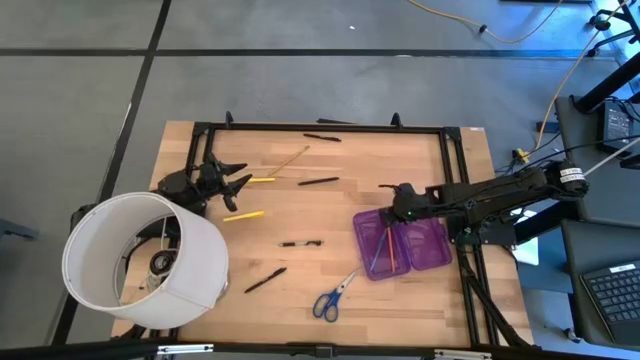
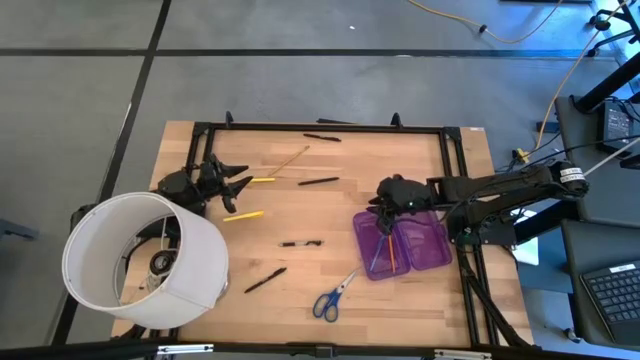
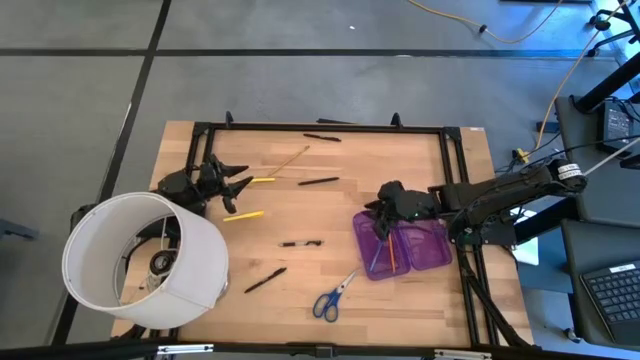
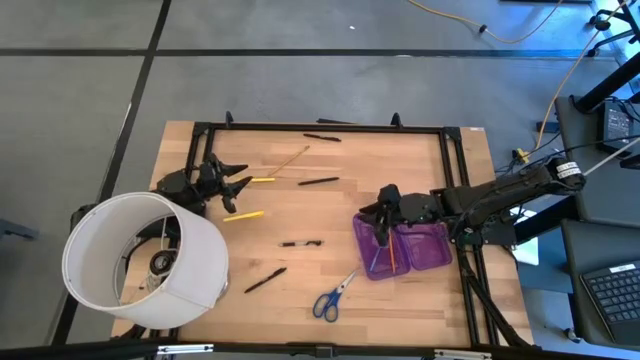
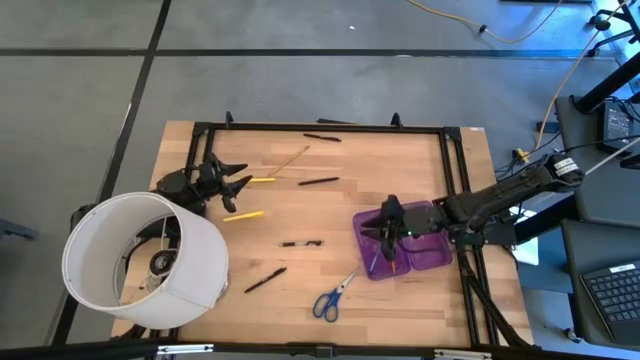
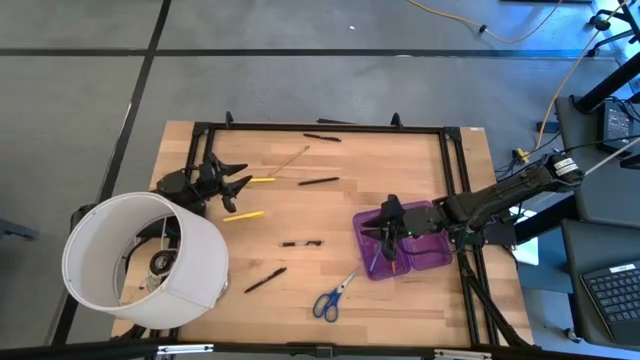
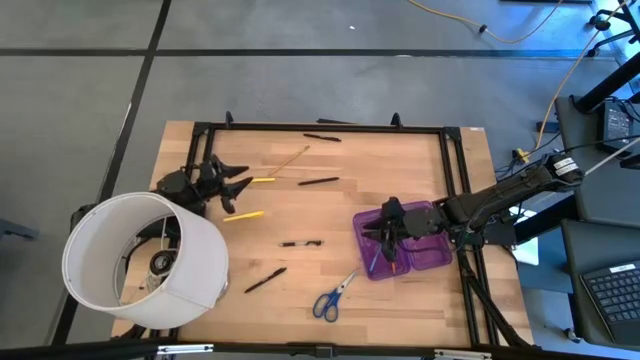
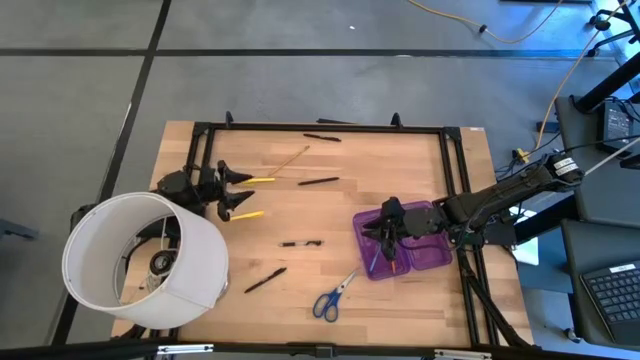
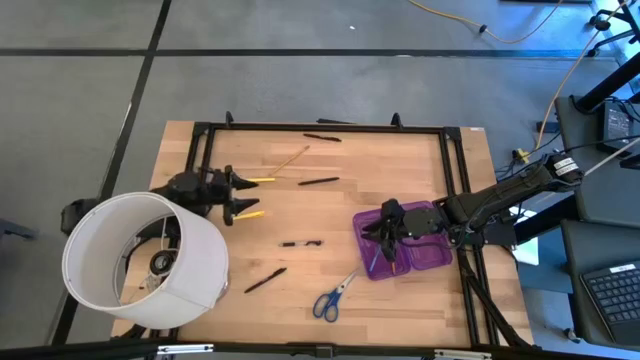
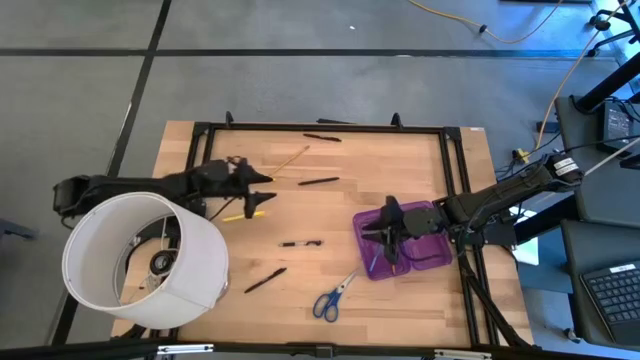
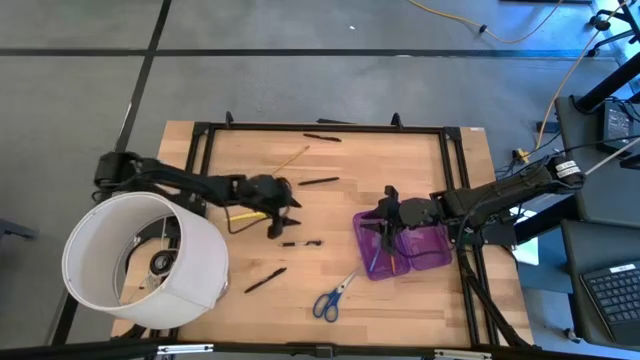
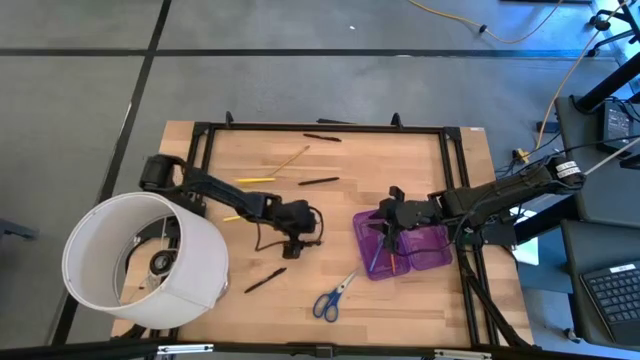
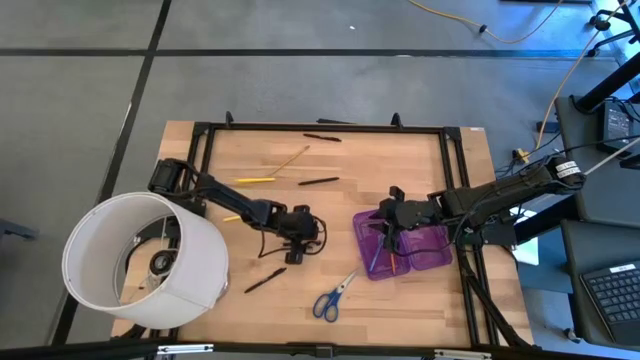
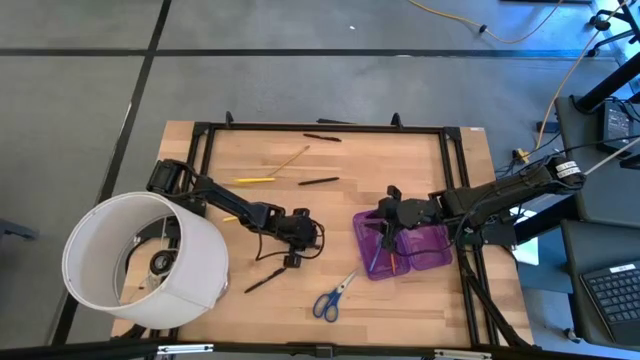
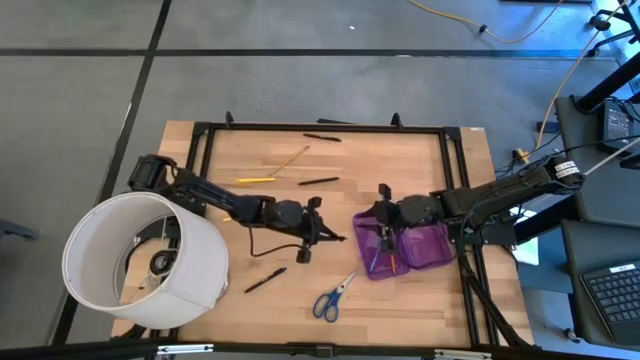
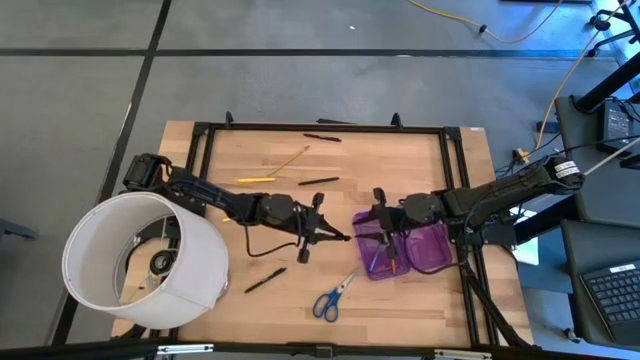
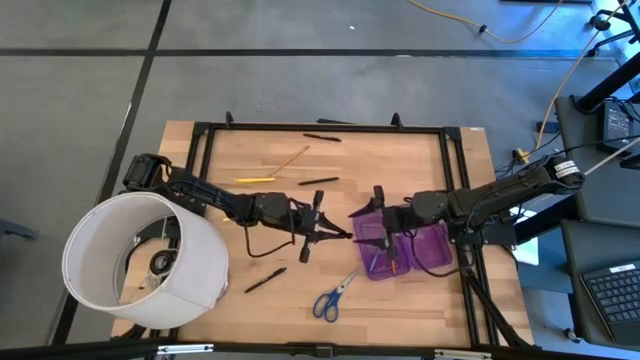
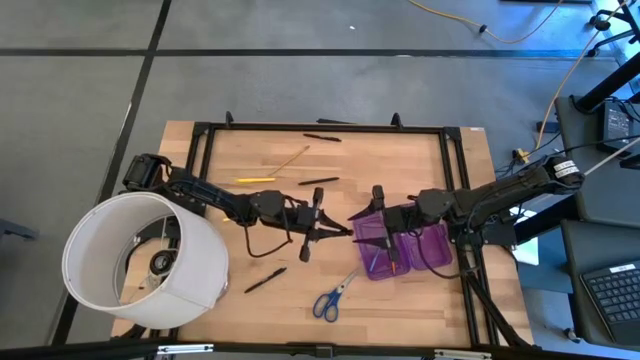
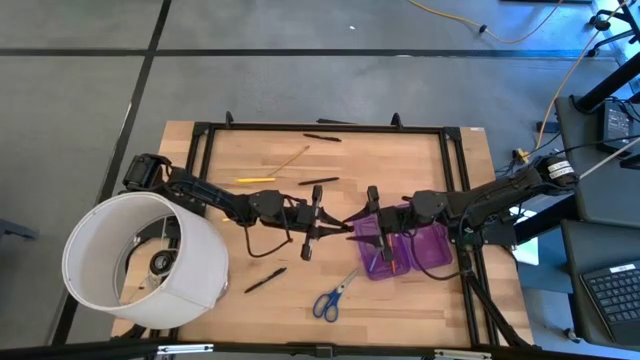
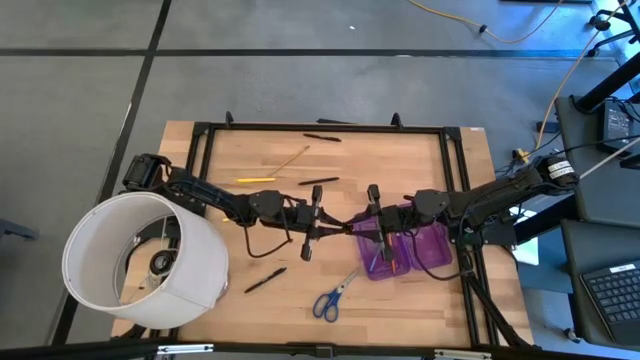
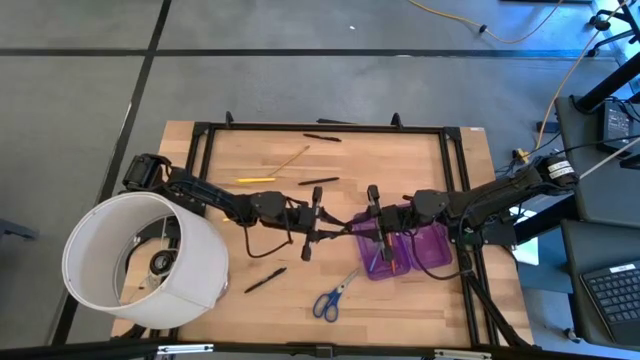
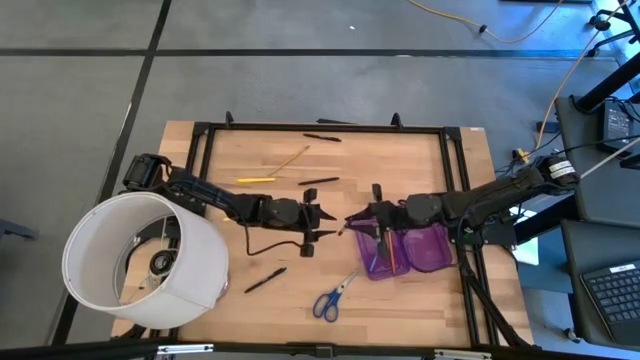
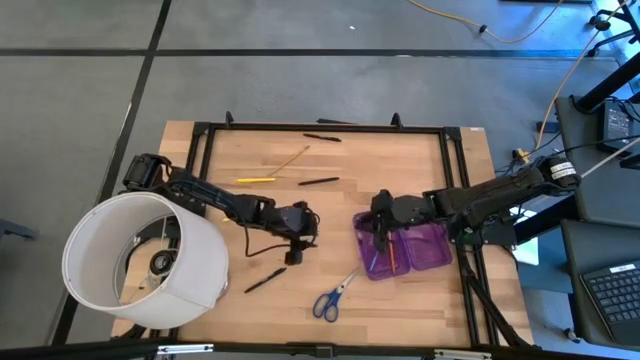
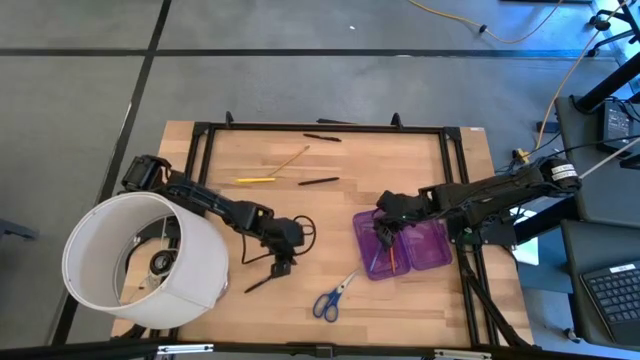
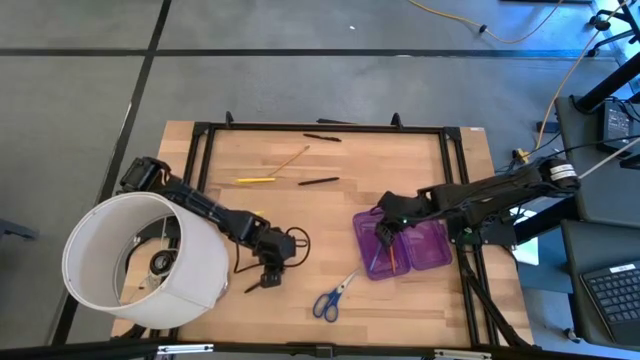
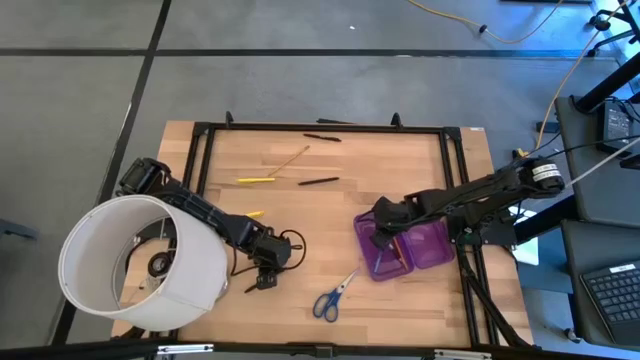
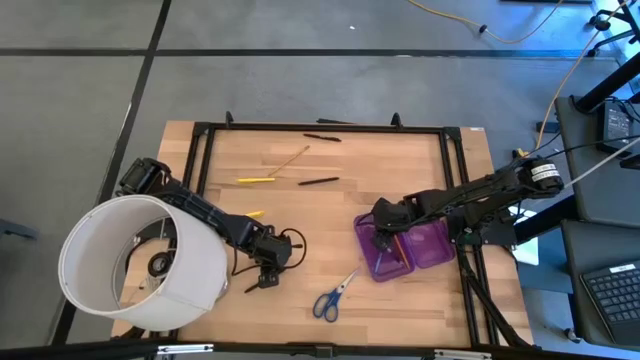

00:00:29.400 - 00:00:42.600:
Task: Pick & place school supplies into a supply box
Put the black pen into the supply box

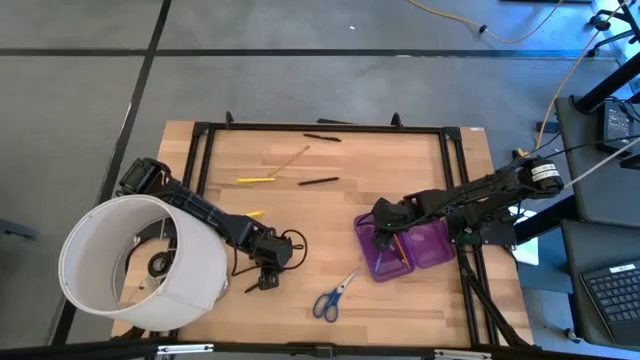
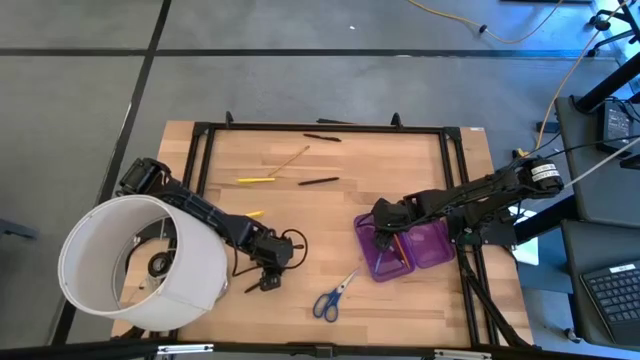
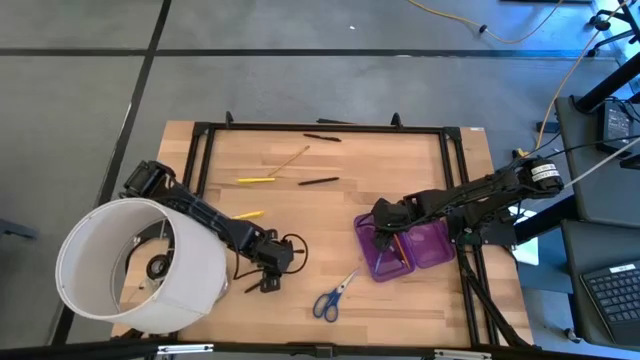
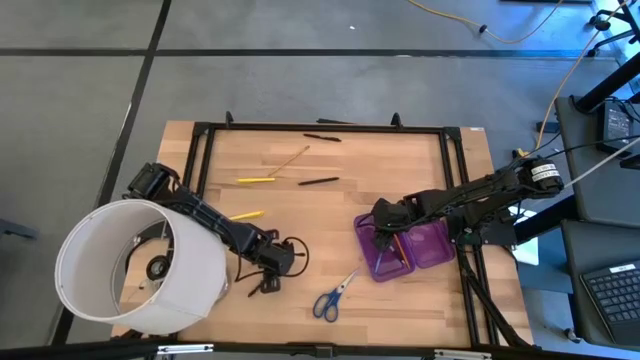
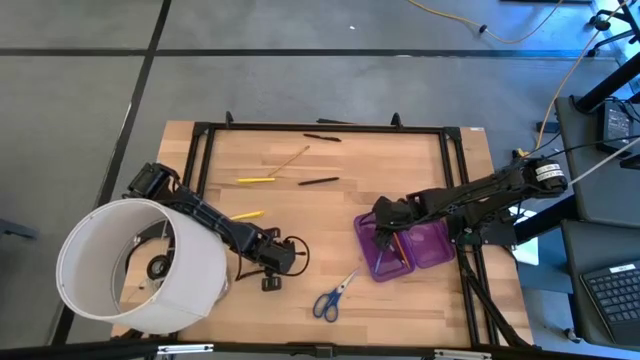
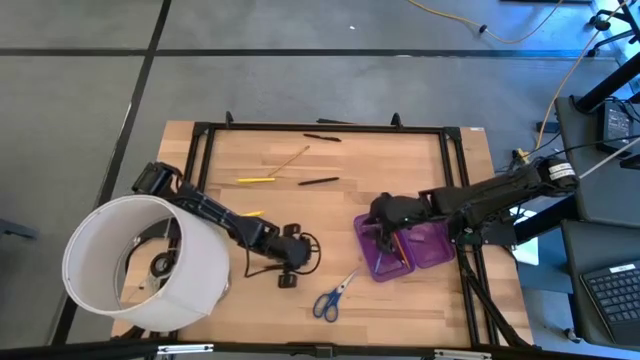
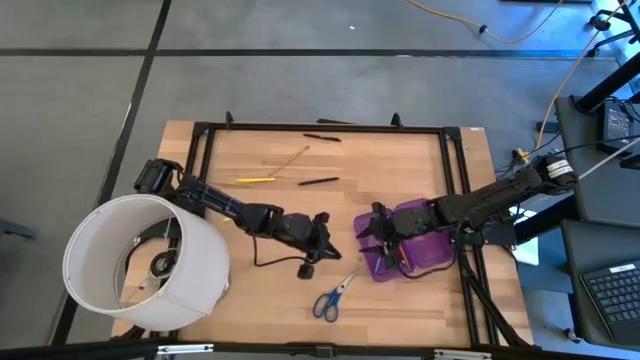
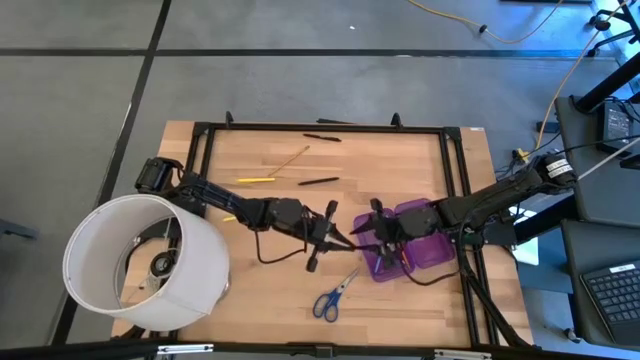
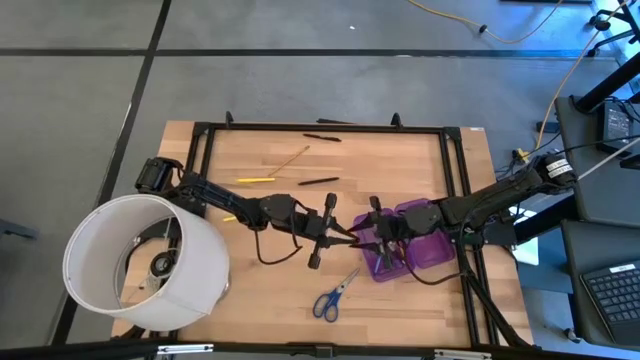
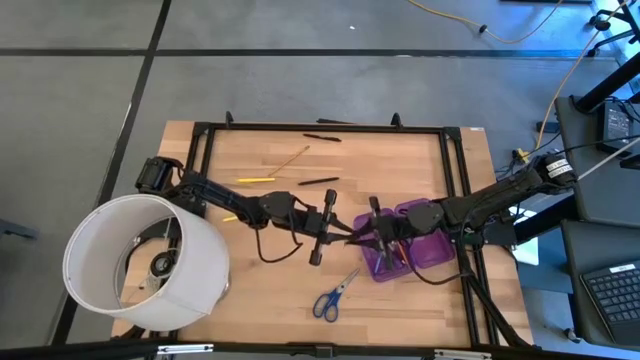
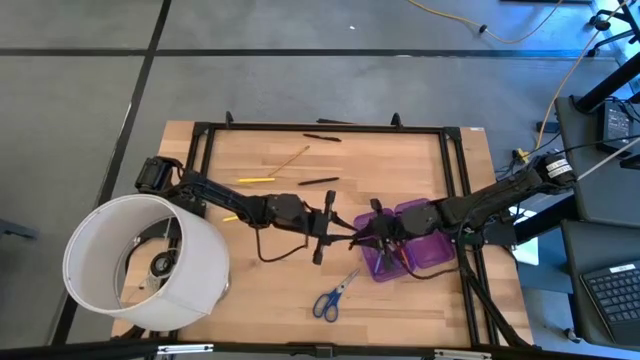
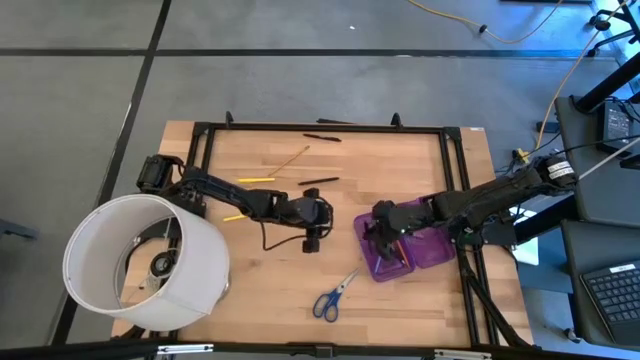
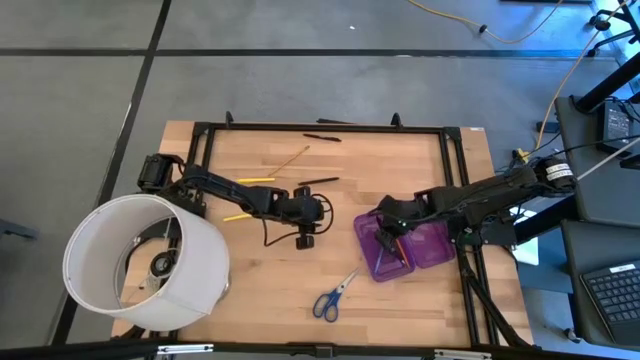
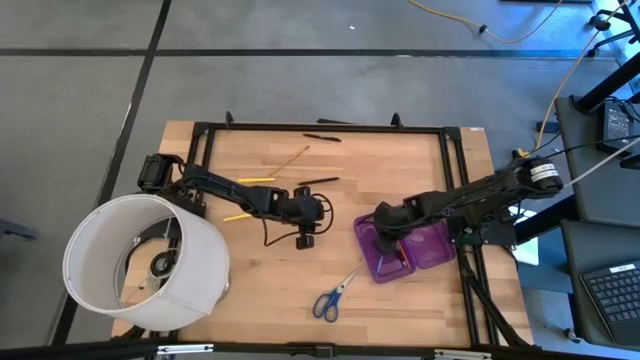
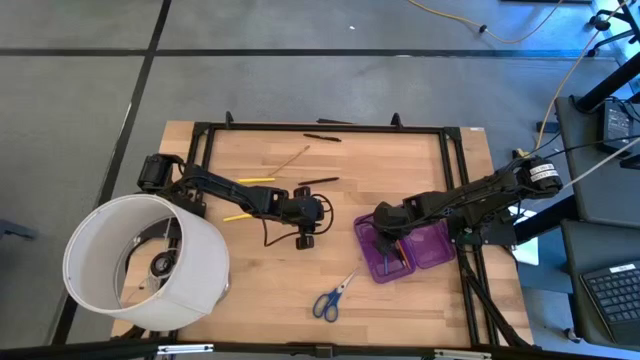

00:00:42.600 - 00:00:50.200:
Put the bottom black pen into the supply box
